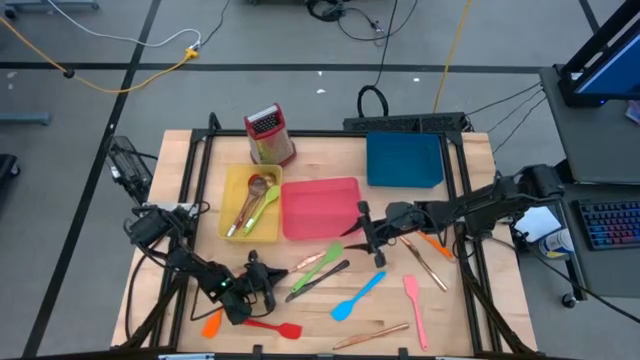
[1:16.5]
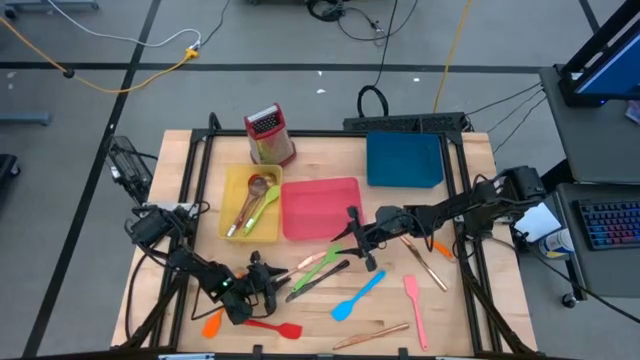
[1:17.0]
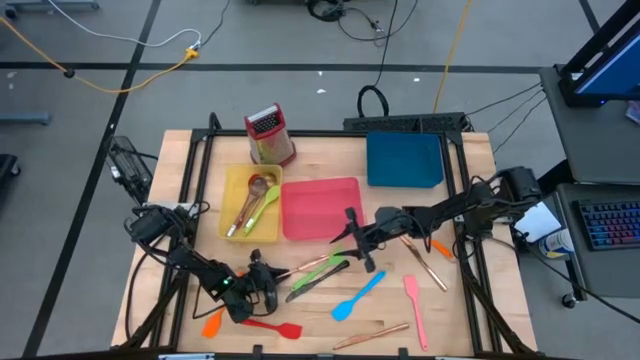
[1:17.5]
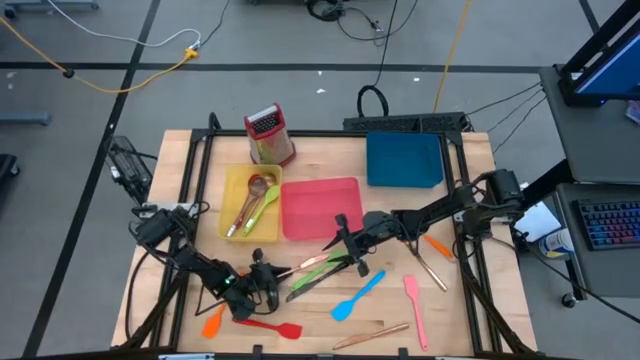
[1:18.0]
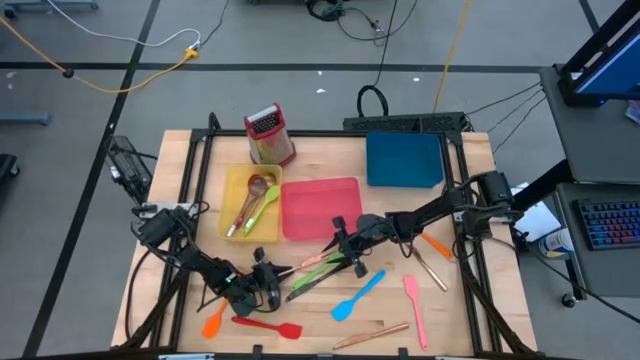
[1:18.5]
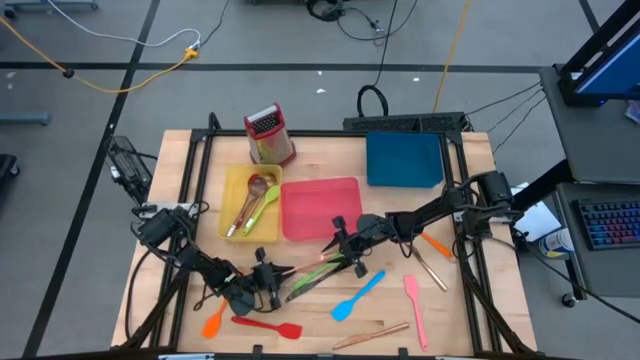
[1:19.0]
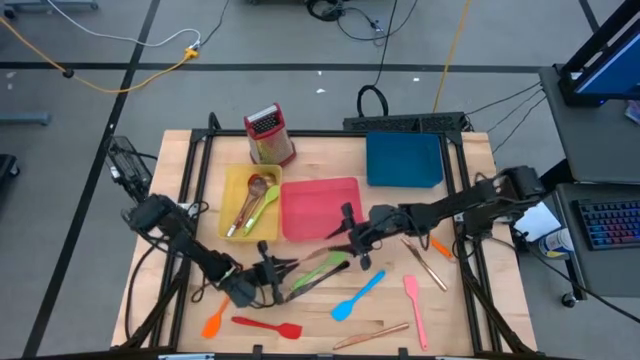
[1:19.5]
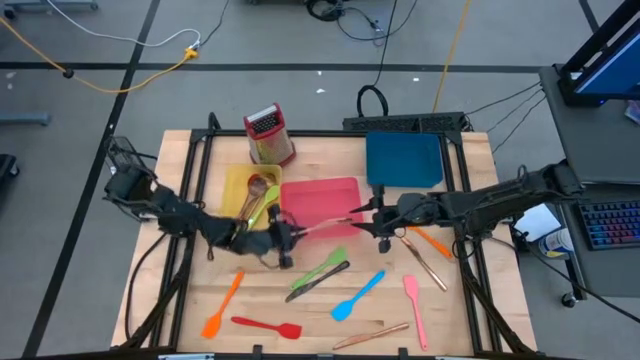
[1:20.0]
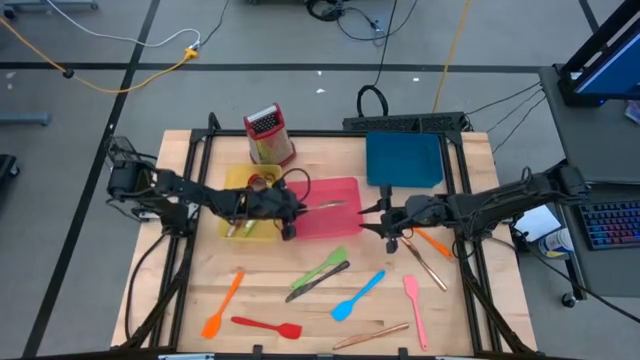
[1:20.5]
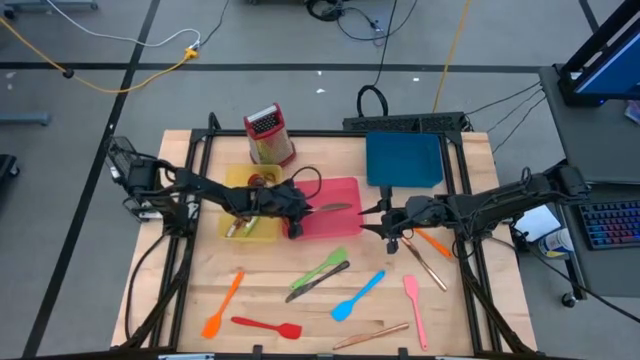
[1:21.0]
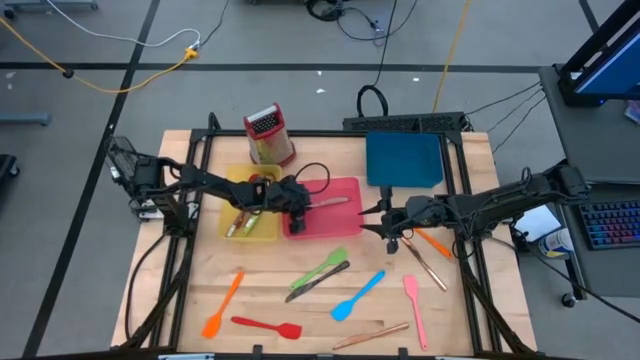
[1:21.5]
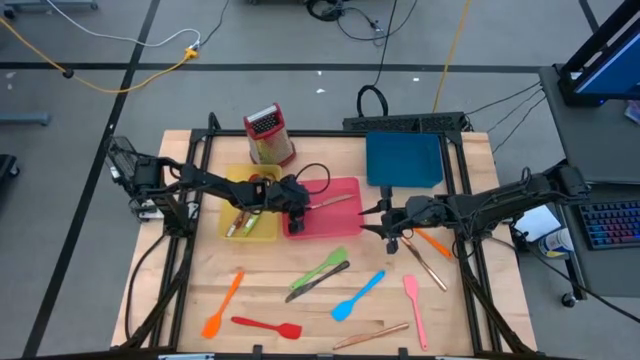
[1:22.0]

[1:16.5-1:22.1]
Task: Pick & Place Kitchen Items
Put the left gold table knife into the pink bin

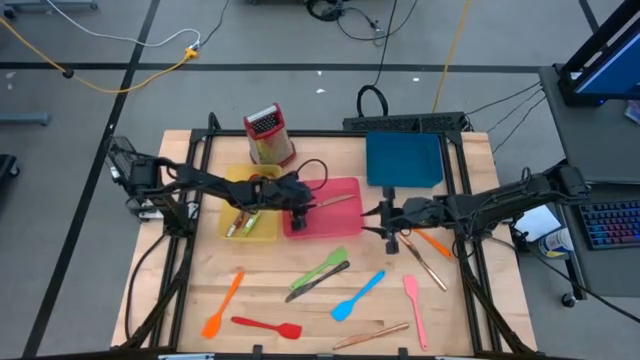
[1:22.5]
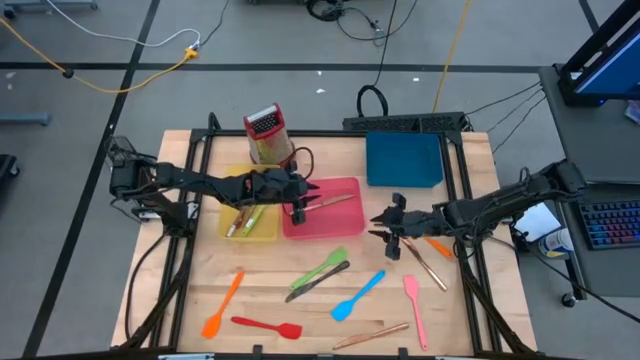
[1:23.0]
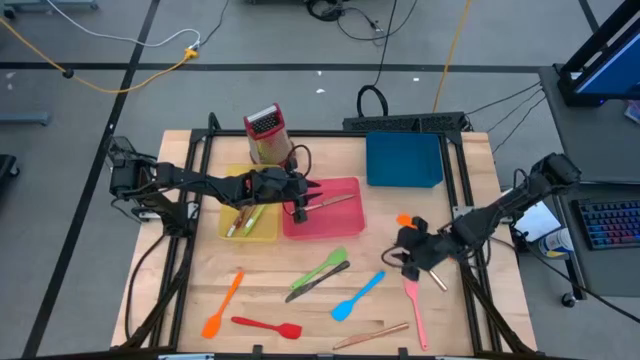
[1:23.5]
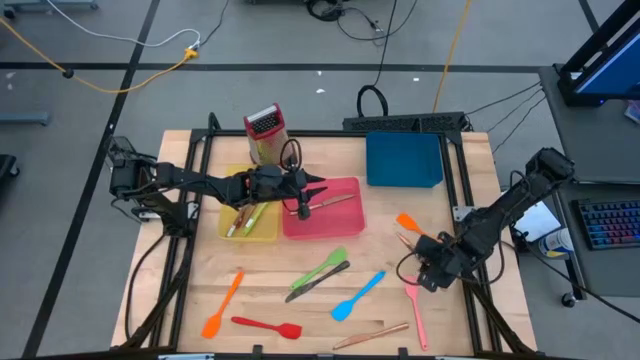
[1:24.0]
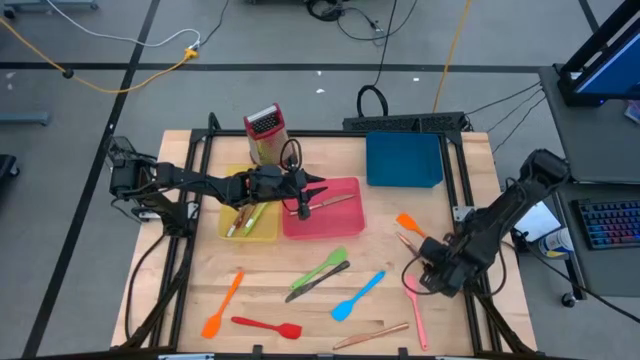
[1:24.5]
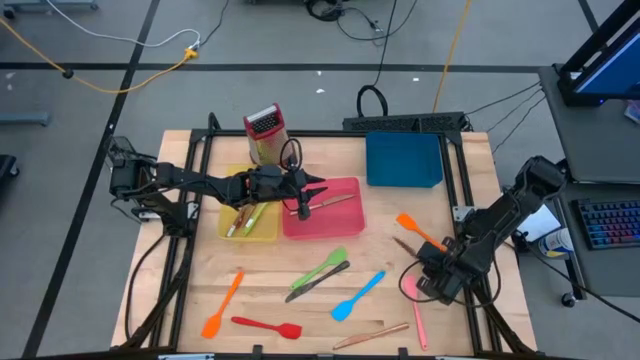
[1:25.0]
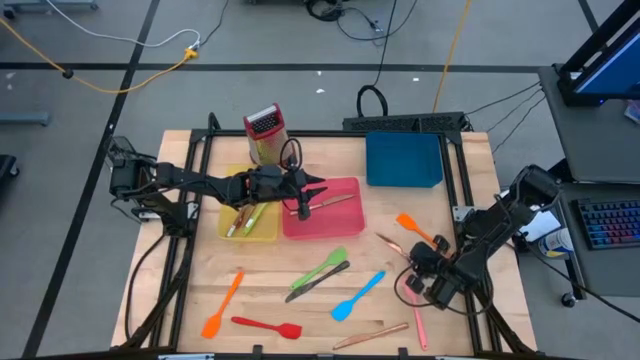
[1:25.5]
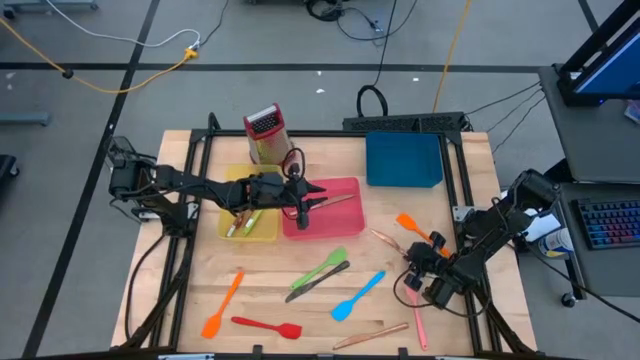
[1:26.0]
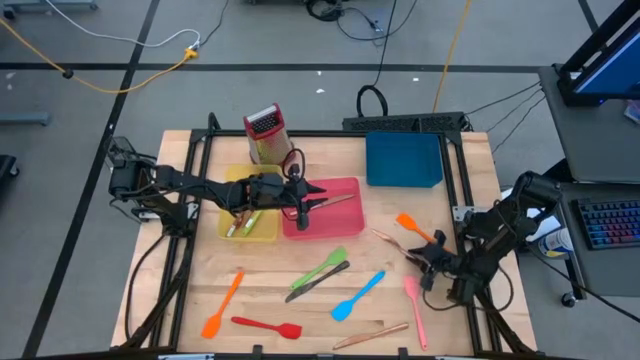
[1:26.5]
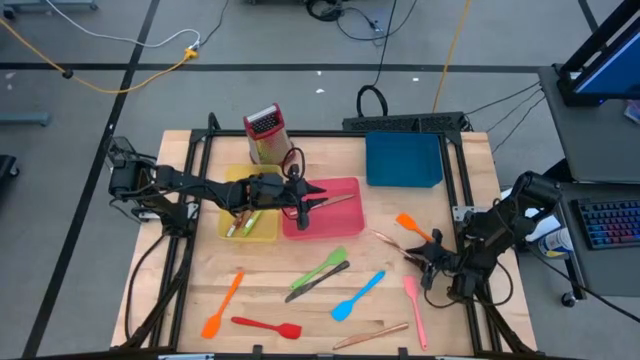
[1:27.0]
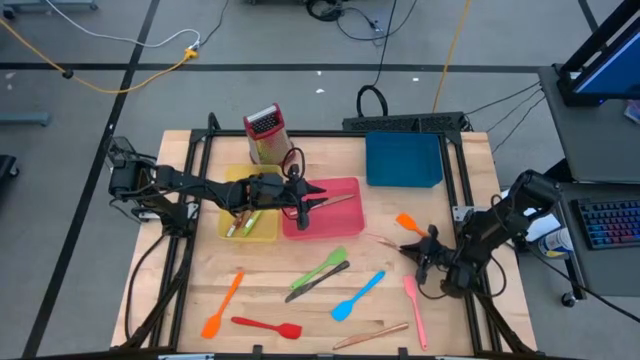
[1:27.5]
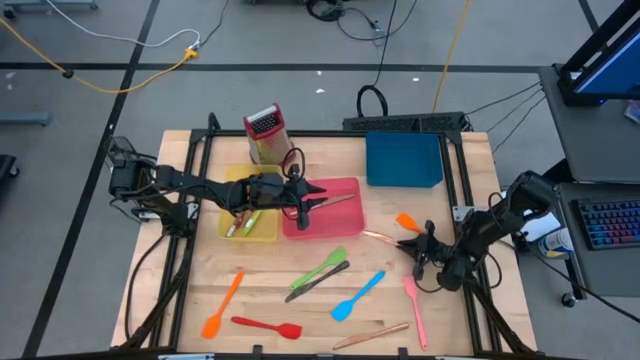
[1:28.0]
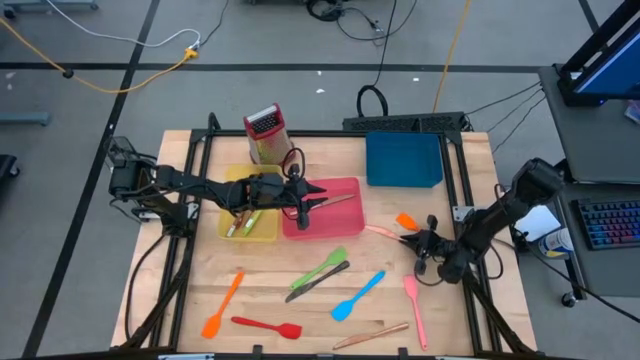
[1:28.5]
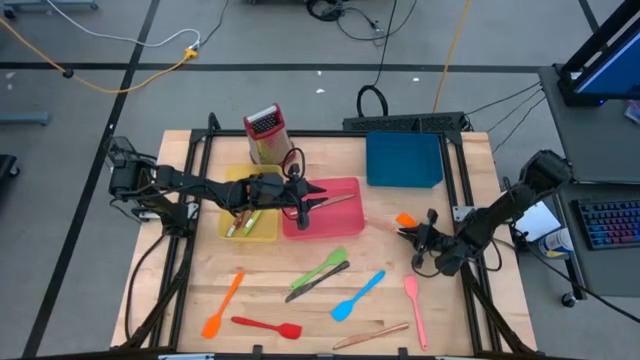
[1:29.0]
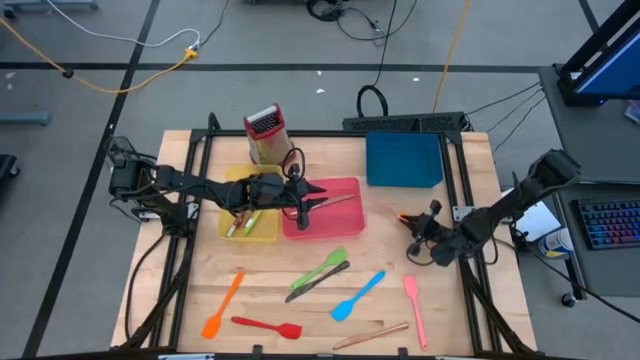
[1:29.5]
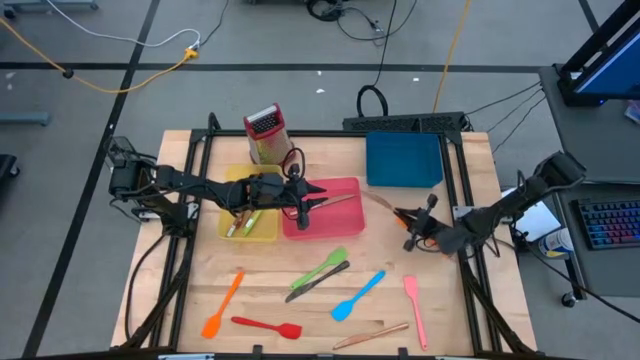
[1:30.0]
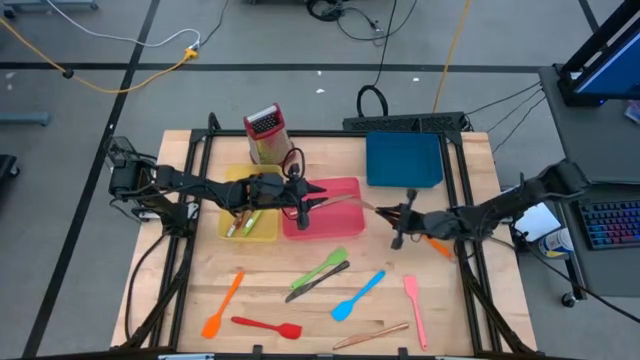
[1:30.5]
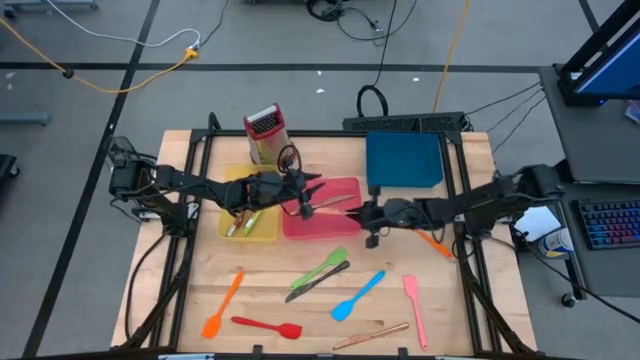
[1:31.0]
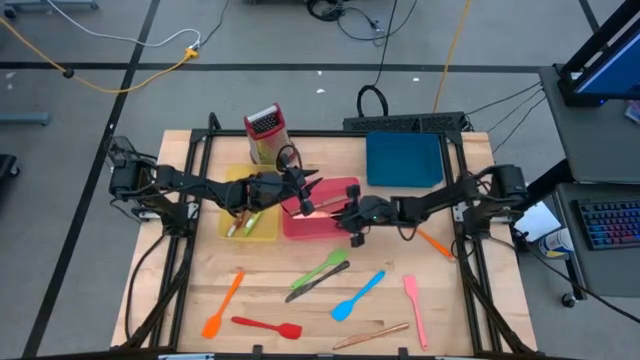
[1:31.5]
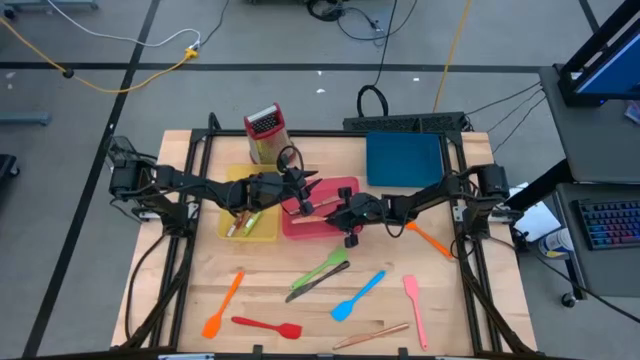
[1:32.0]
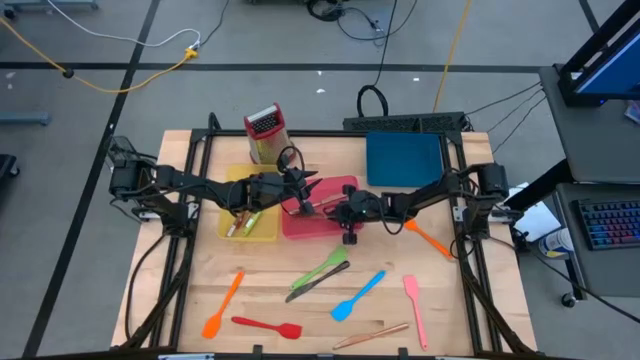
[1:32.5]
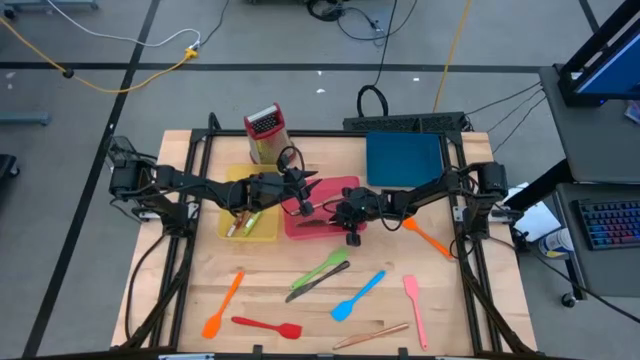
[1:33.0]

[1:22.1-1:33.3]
Put the top gold table knife into the pink bin

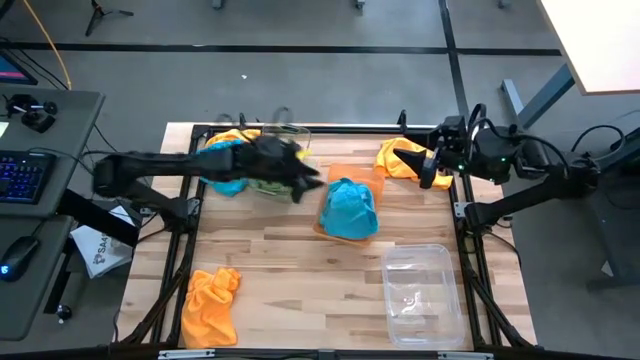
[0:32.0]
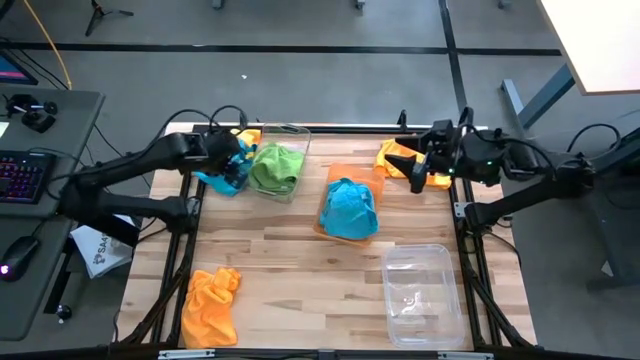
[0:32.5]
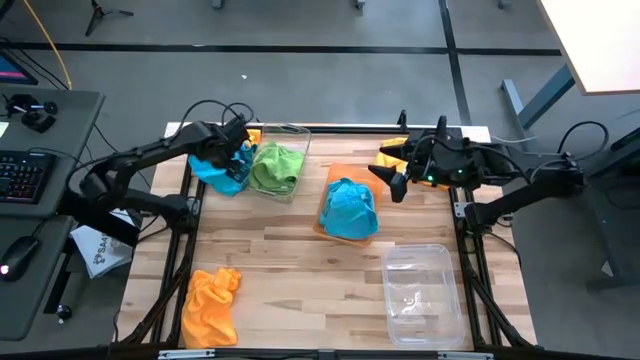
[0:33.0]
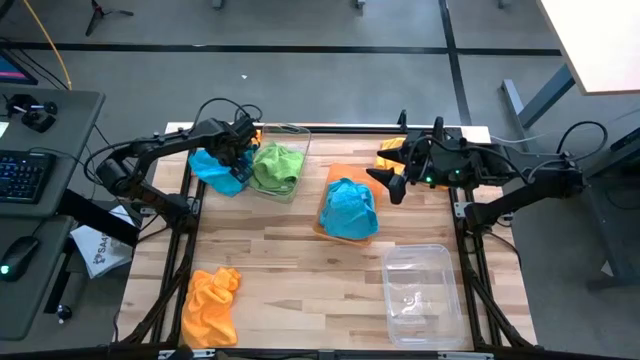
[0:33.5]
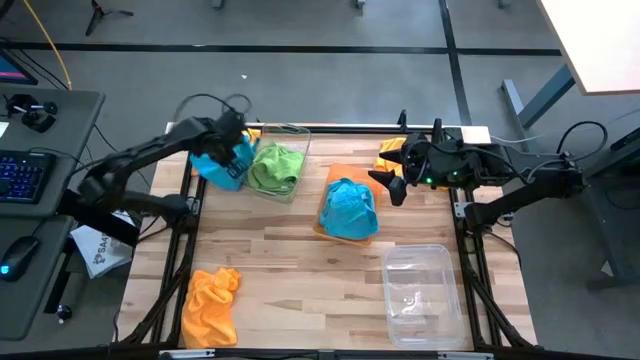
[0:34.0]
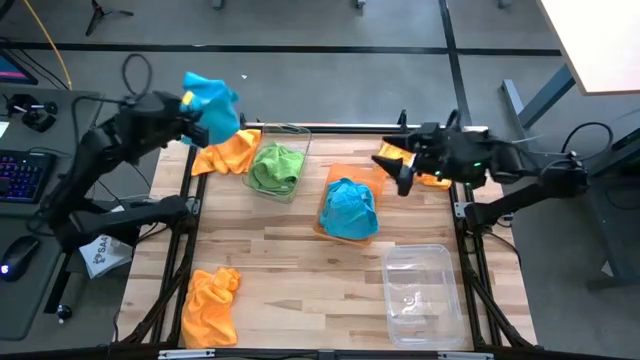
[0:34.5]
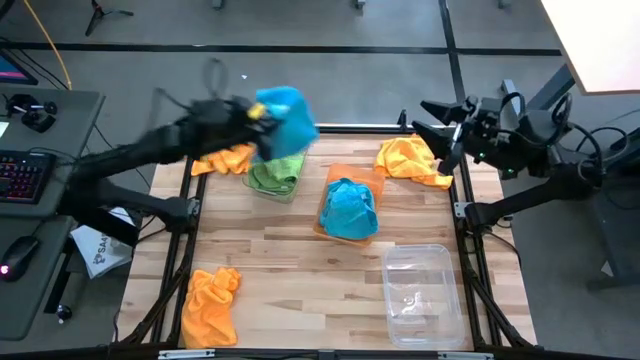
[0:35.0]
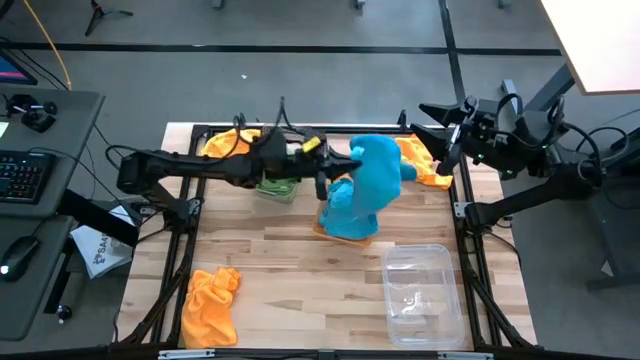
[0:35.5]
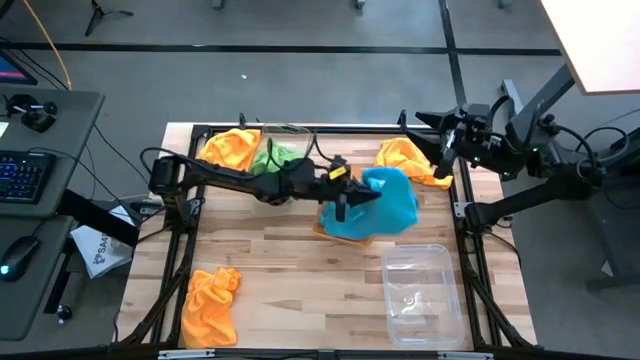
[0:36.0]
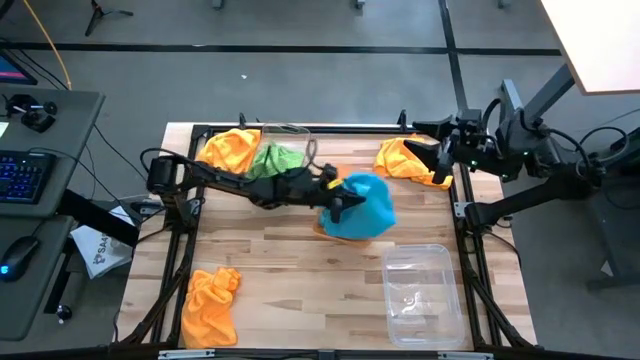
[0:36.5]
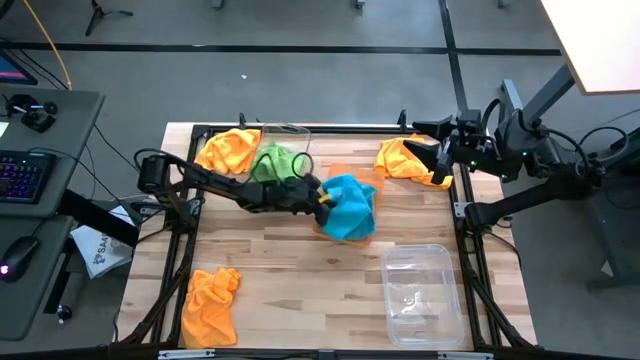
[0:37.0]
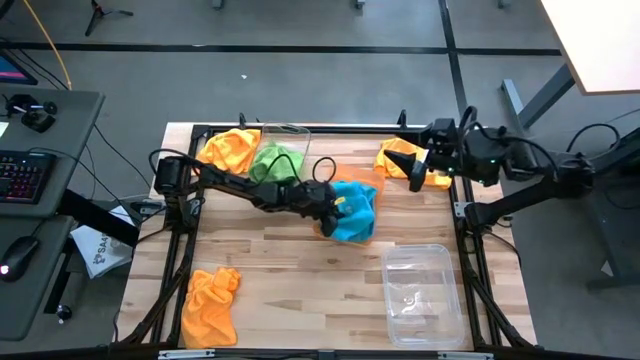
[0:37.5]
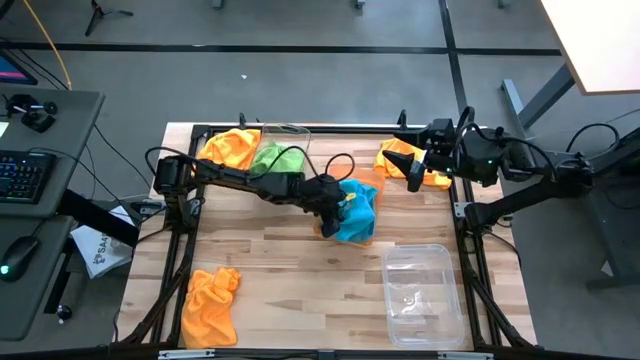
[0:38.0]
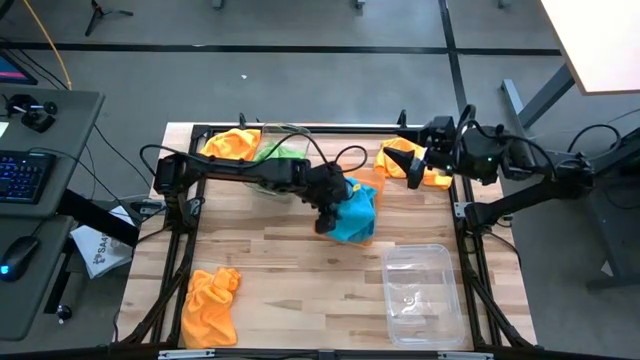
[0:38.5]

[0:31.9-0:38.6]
Task: Sort microfiber towel by color & place in baskets
Put the blue microfiber cloth into the orange bin
